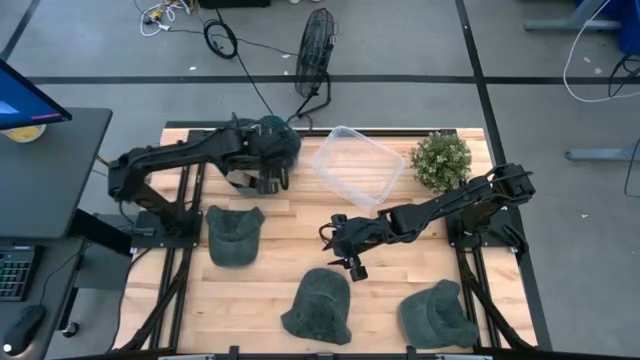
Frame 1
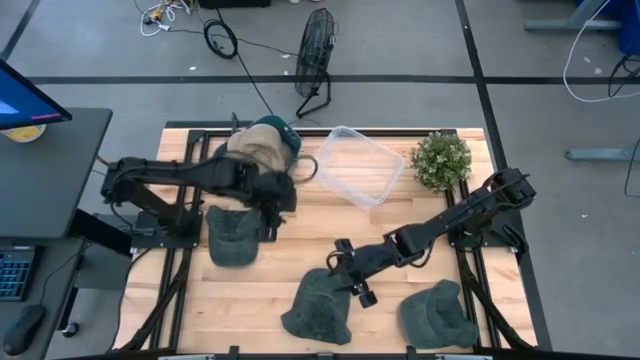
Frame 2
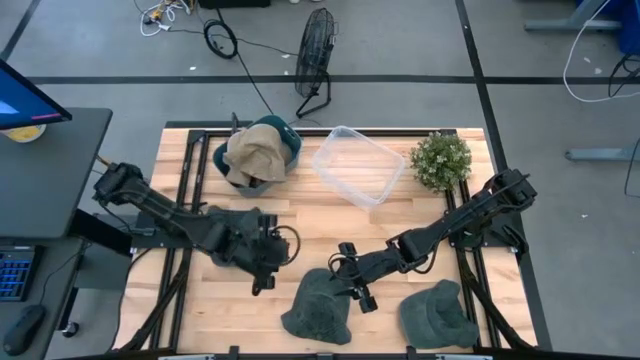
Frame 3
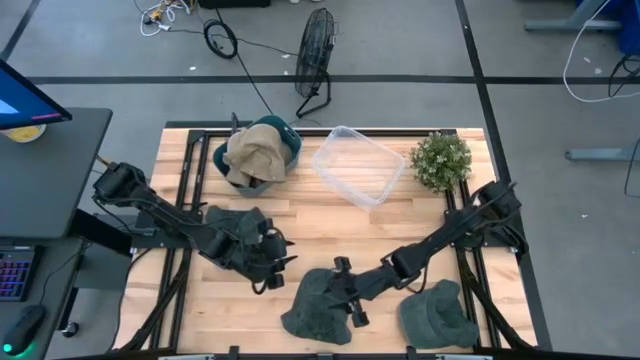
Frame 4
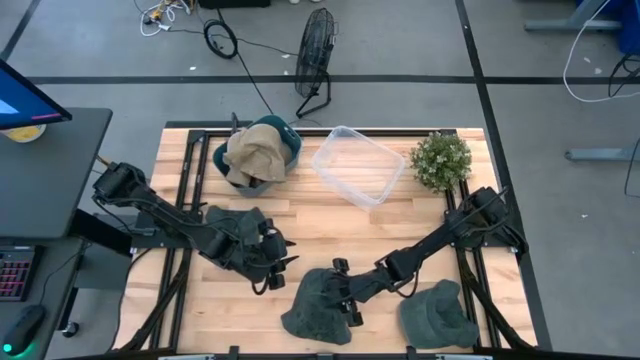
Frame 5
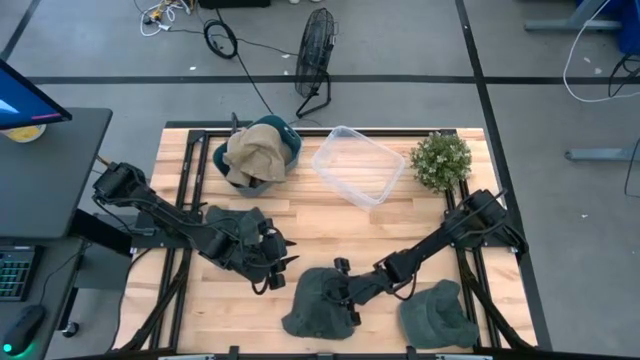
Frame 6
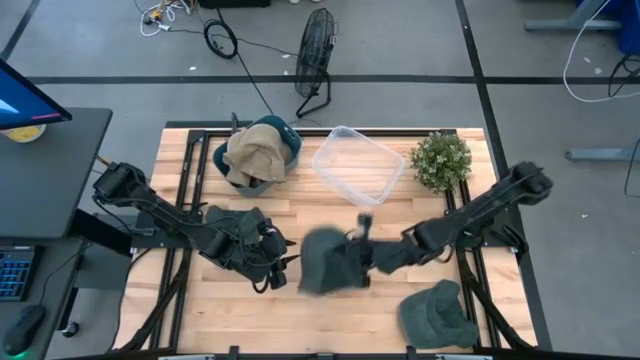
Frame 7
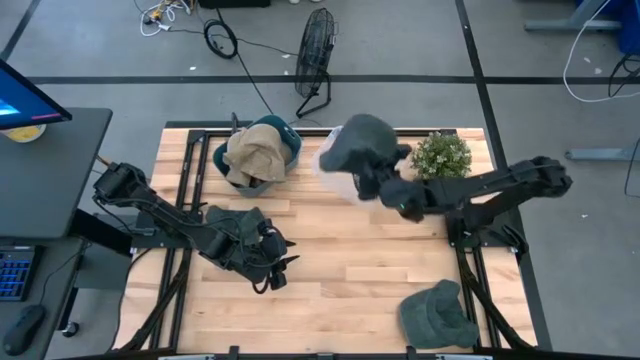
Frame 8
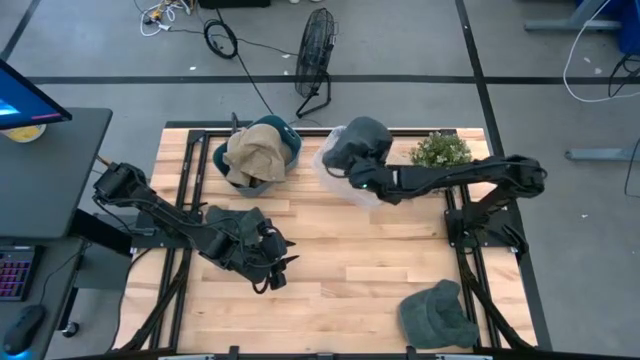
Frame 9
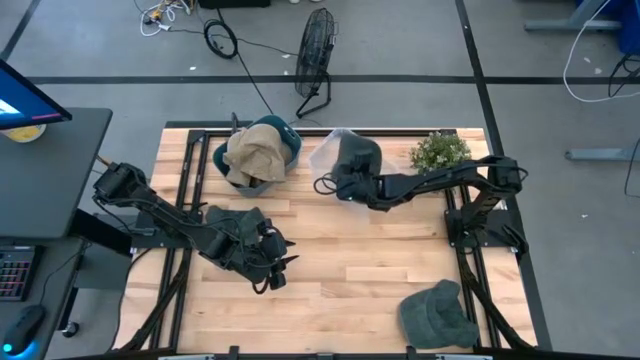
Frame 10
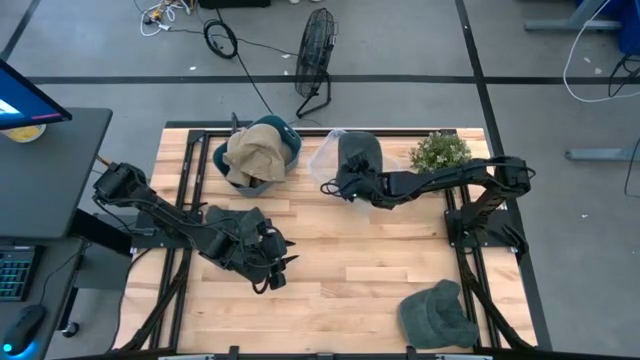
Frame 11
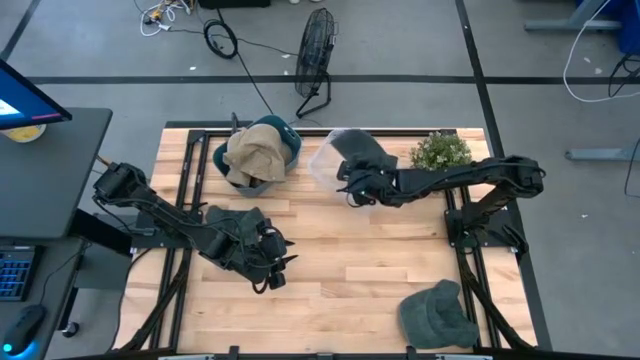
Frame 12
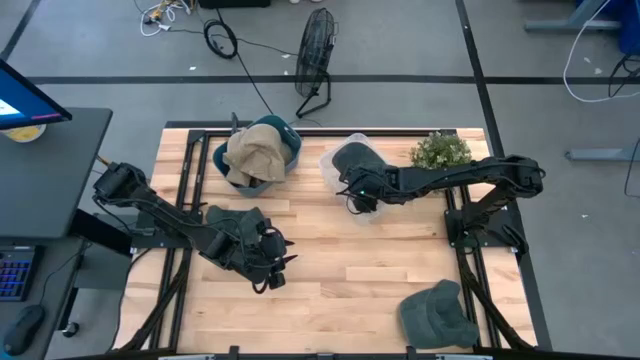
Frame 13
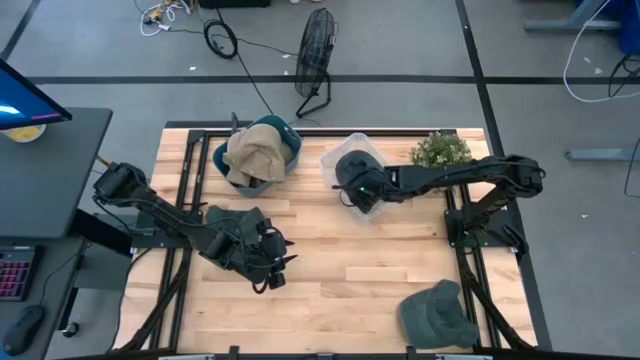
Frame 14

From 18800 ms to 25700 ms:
Task: Pick & Place hat
Put the bottom left blue cap into the transparent bin

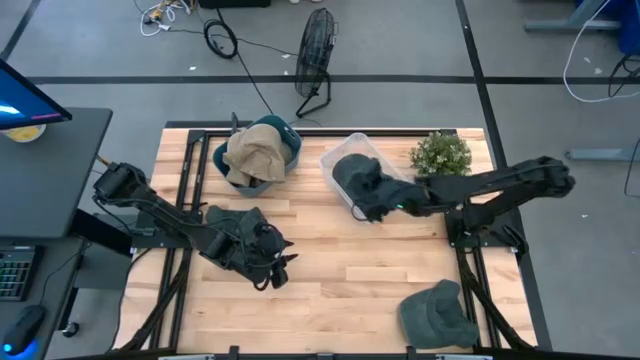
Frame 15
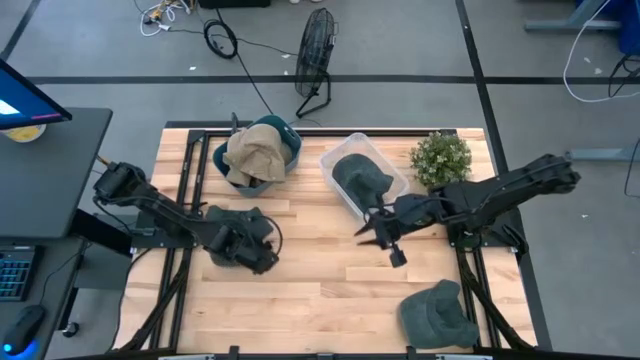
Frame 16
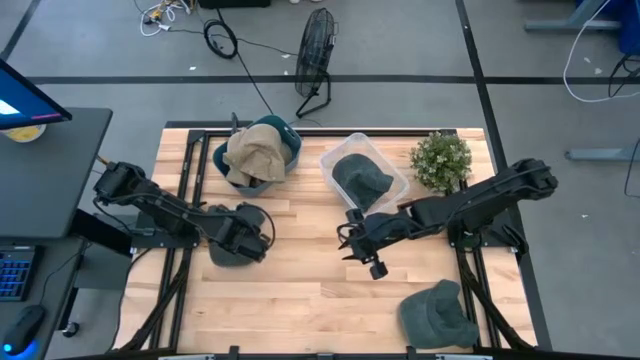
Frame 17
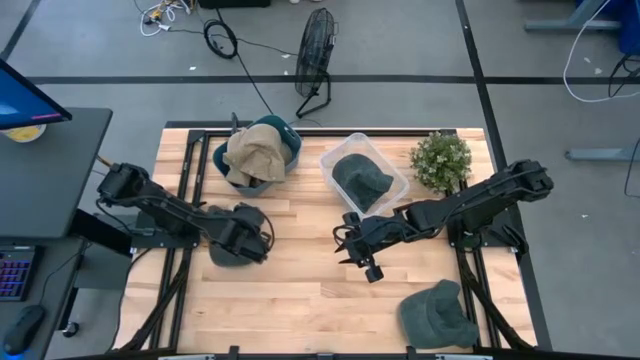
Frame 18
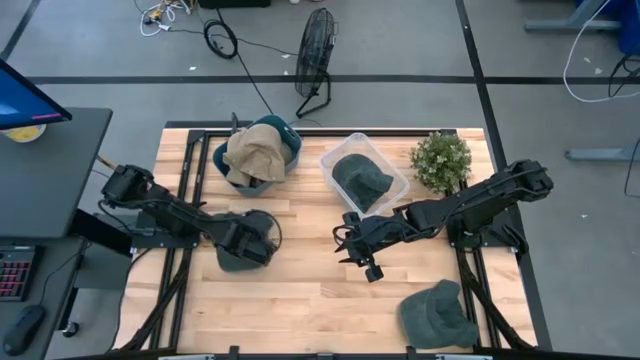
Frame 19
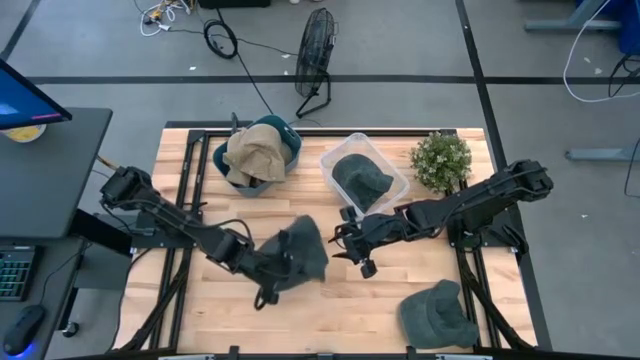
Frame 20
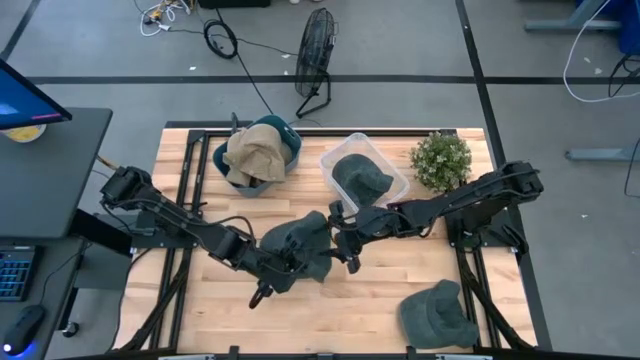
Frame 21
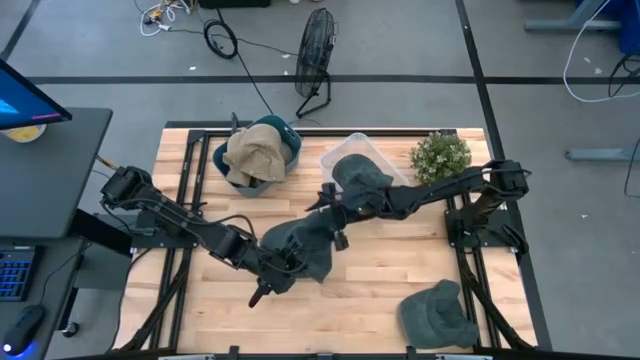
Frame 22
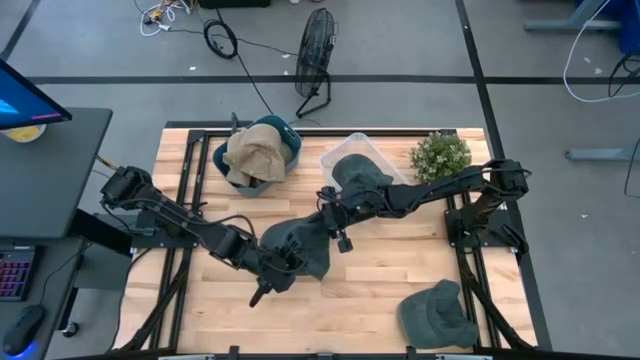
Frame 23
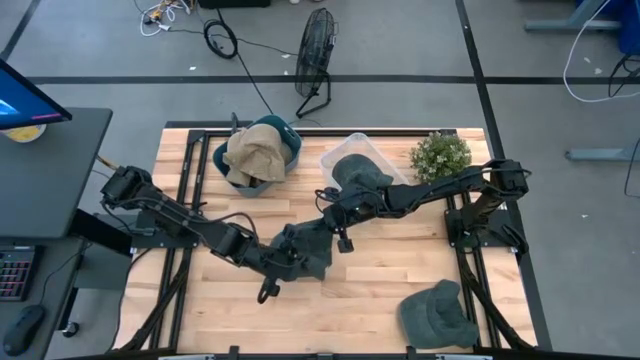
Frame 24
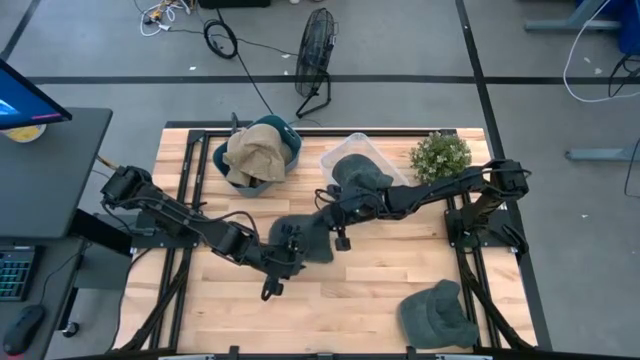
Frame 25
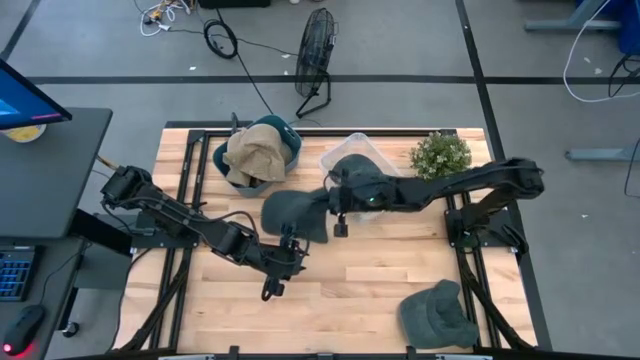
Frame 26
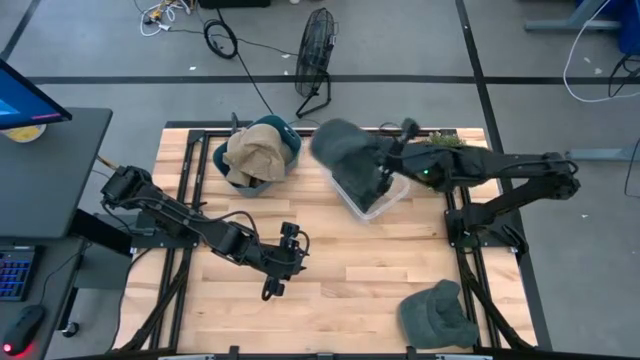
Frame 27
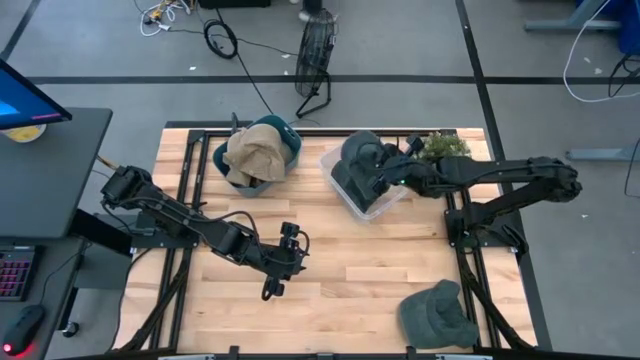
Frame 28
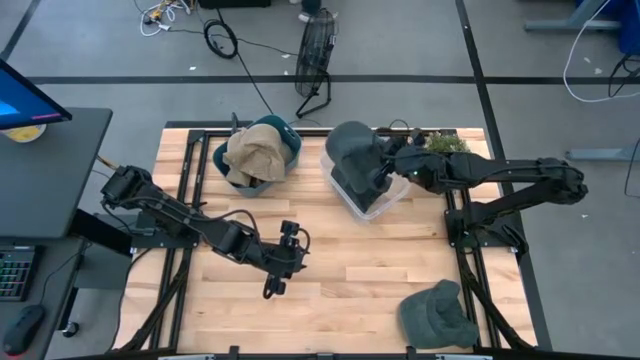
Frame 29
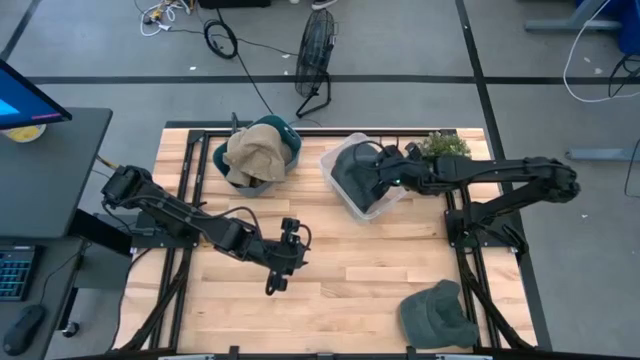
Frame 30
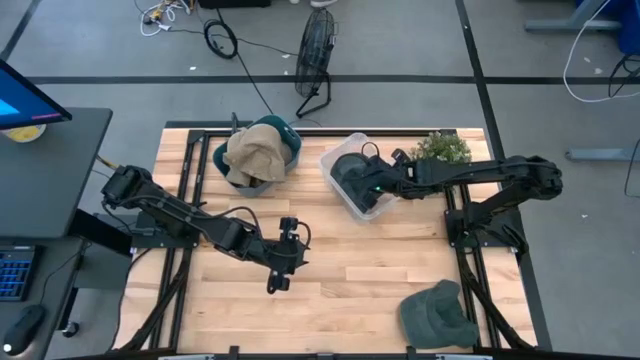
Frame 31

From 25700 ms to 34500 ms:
Put the top blue cap into the transparent bin

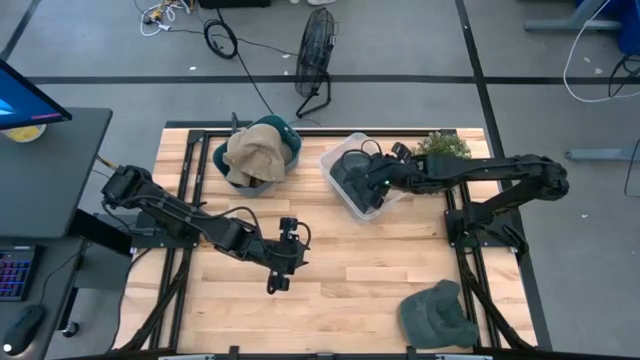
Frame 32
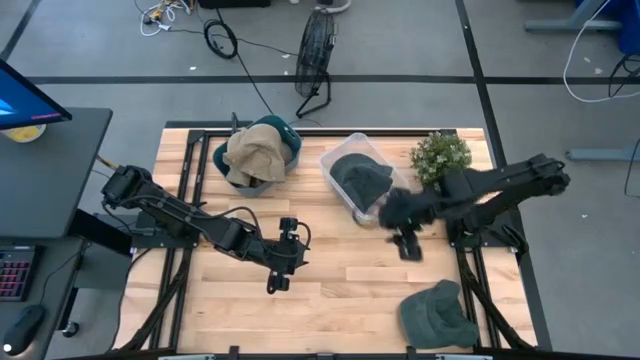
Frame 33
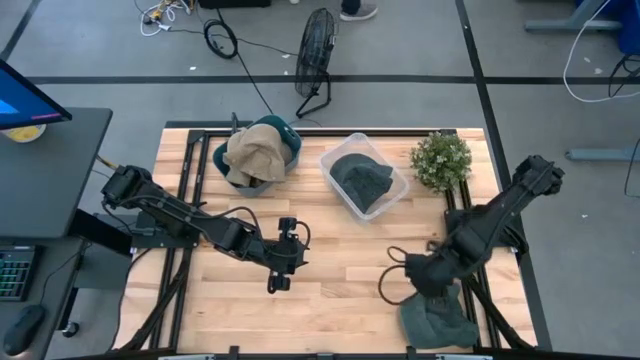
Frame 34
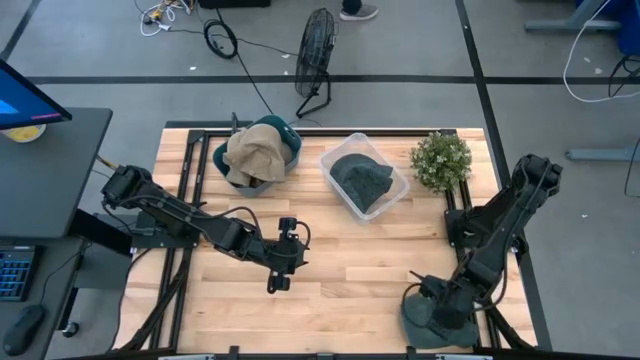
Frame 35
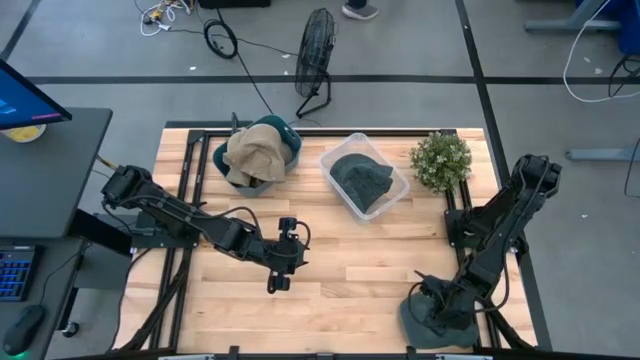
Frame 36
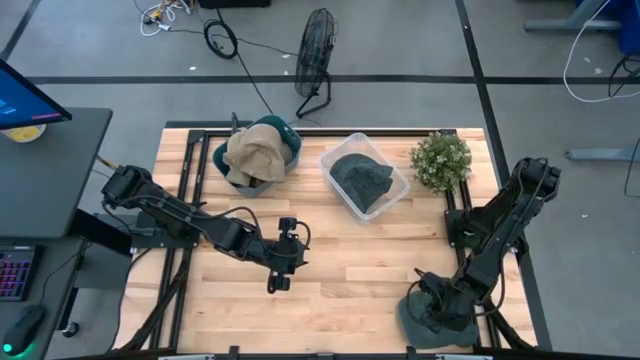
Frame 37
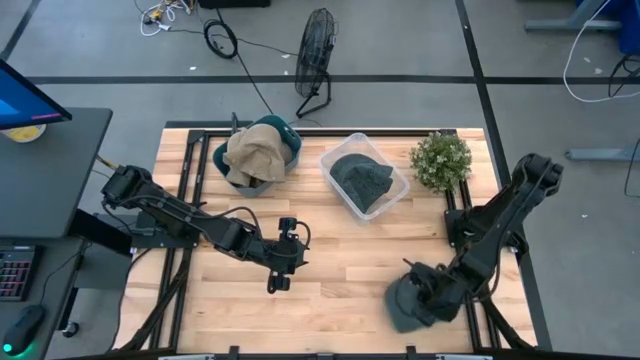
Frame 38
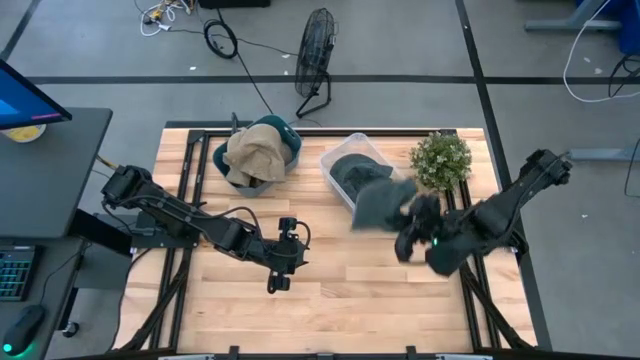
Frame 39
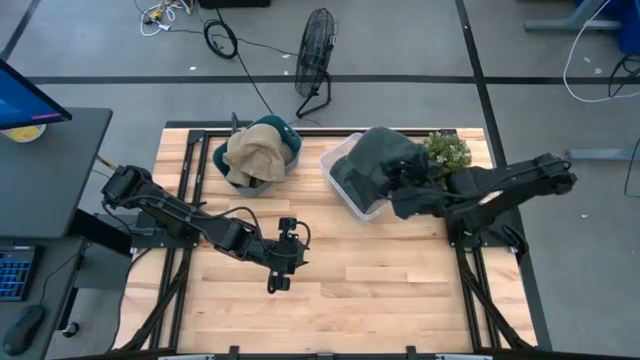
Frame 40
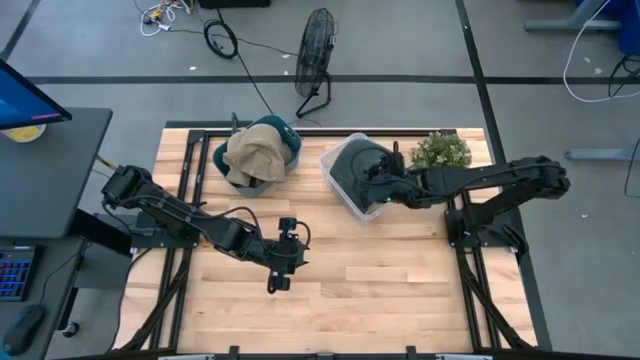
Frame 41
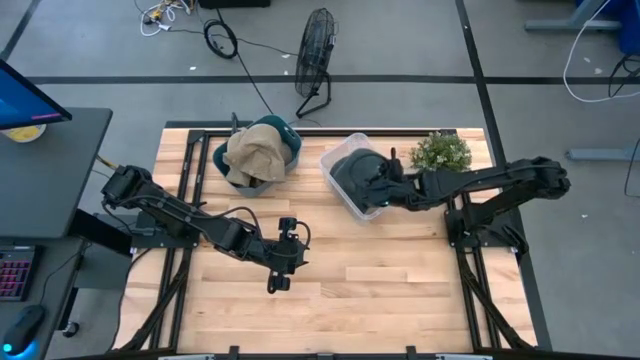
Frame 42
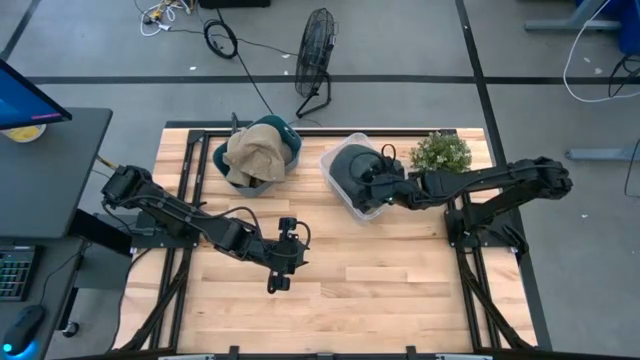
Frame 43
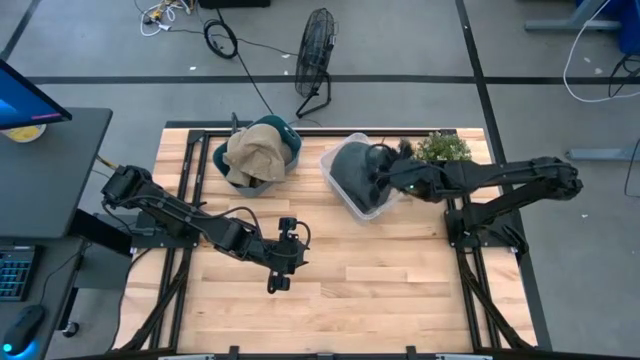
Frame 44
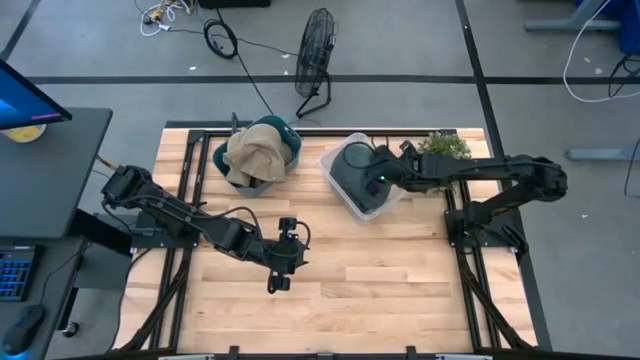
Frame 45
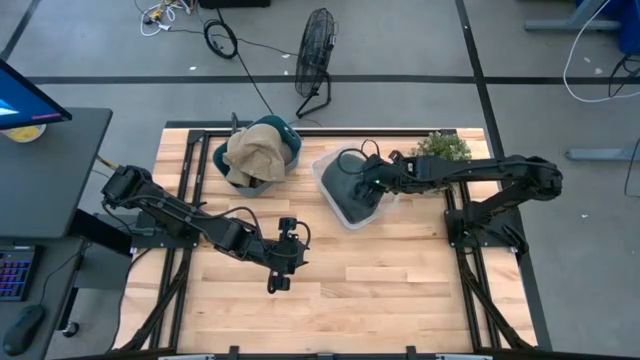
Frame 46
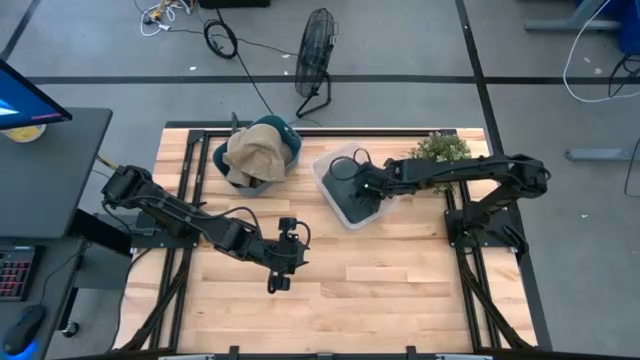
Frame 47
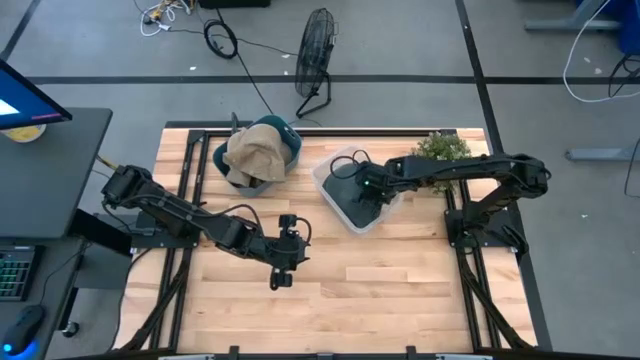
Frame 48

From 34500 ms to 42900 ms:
Put the blue cap into the transparent bin
